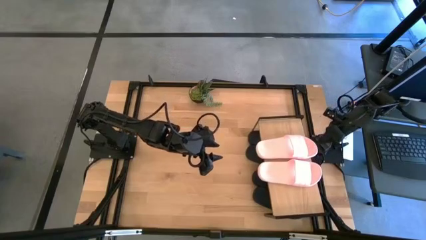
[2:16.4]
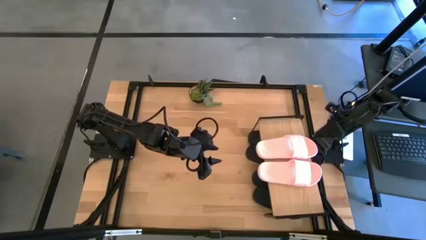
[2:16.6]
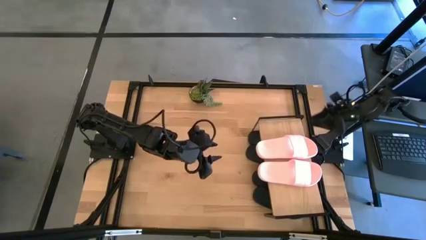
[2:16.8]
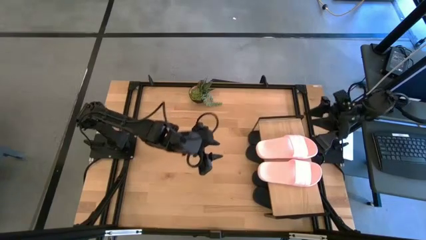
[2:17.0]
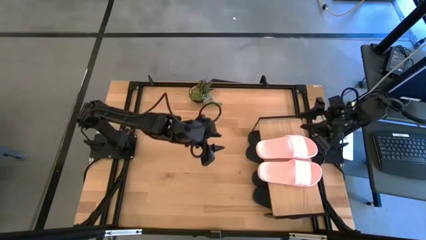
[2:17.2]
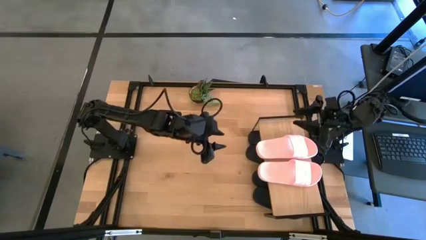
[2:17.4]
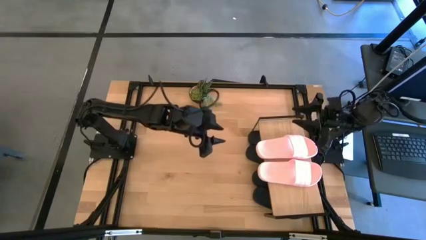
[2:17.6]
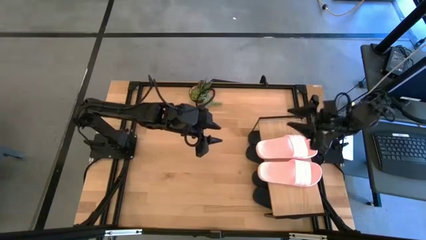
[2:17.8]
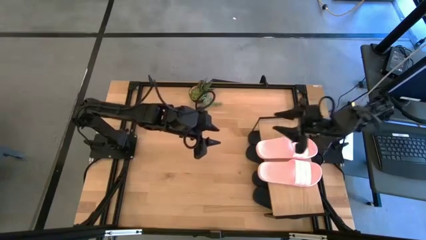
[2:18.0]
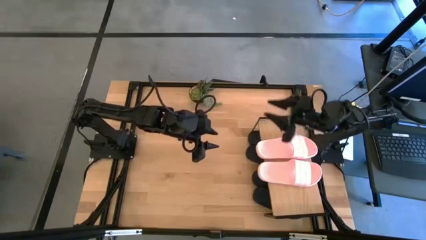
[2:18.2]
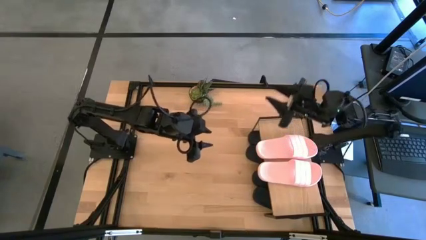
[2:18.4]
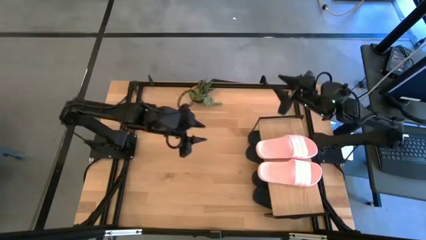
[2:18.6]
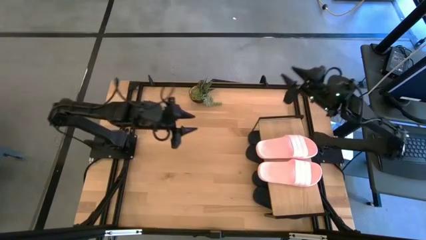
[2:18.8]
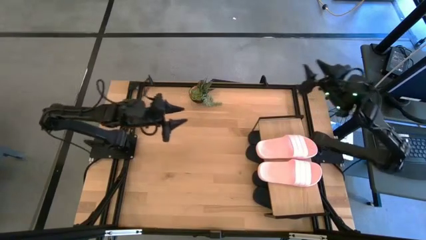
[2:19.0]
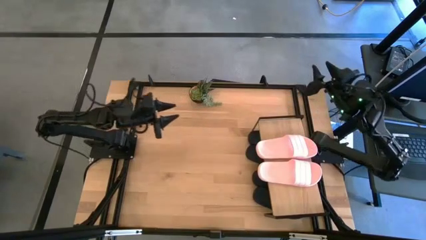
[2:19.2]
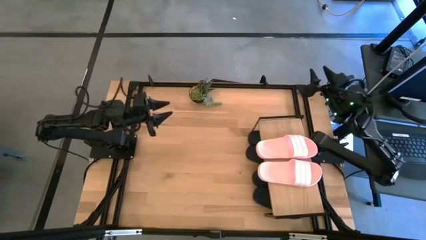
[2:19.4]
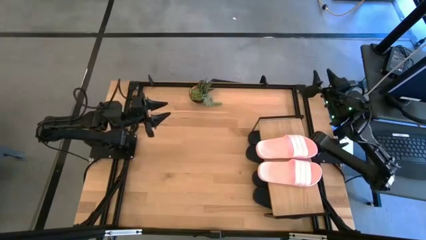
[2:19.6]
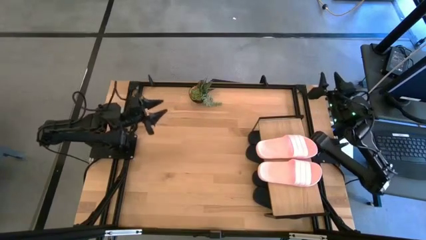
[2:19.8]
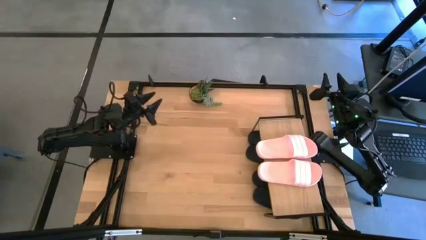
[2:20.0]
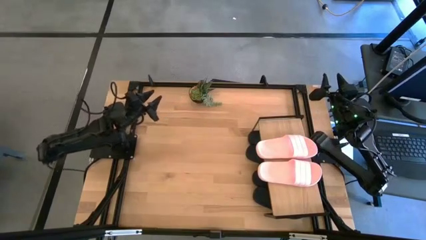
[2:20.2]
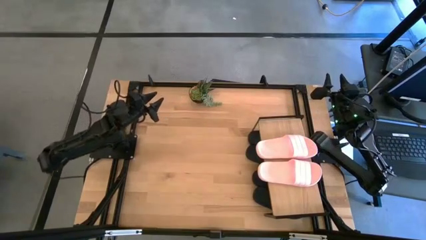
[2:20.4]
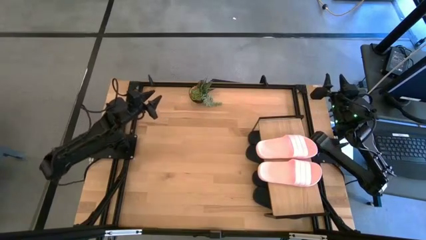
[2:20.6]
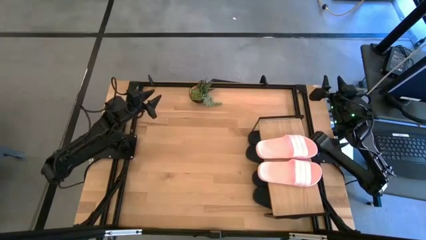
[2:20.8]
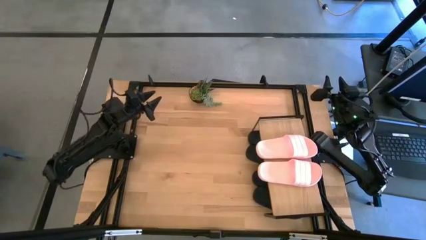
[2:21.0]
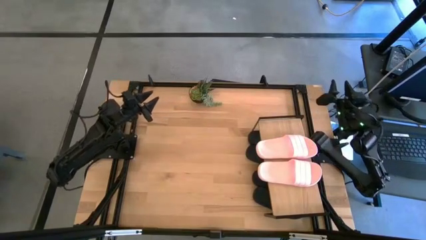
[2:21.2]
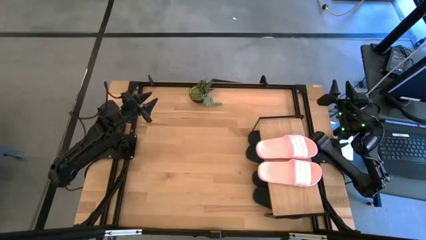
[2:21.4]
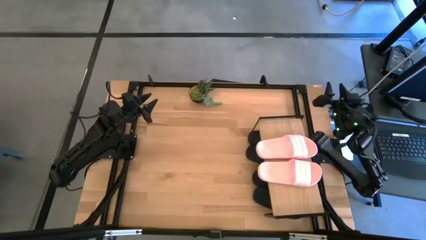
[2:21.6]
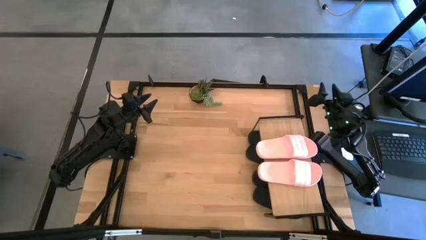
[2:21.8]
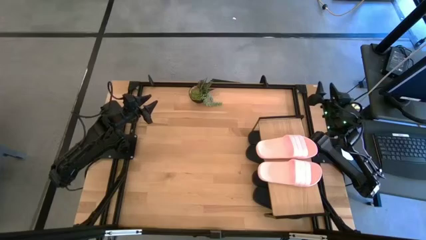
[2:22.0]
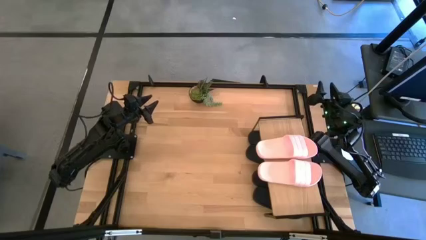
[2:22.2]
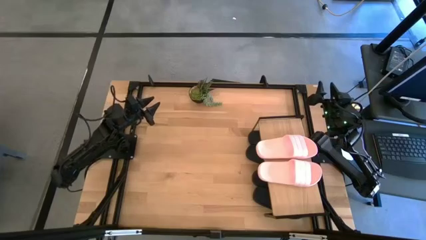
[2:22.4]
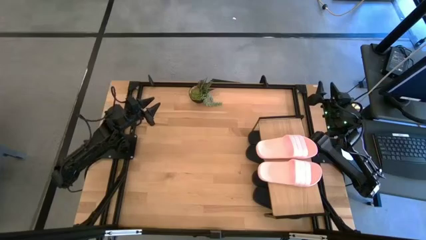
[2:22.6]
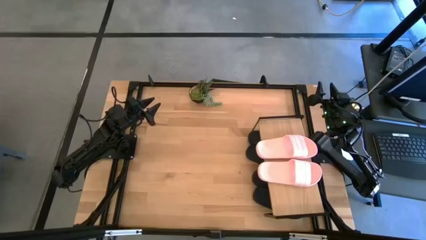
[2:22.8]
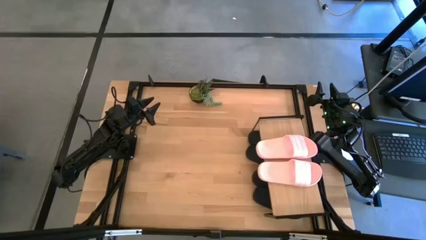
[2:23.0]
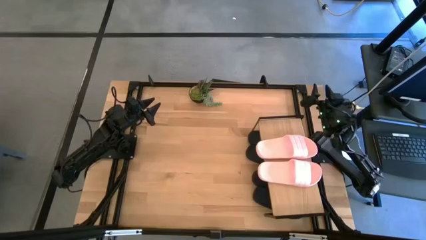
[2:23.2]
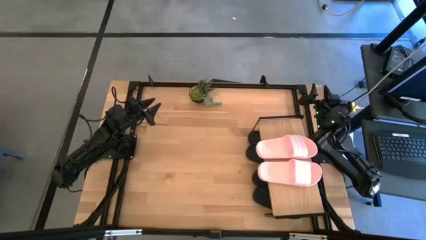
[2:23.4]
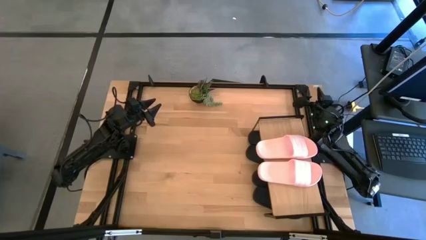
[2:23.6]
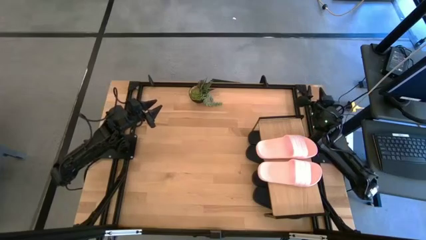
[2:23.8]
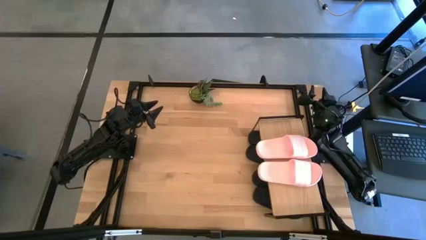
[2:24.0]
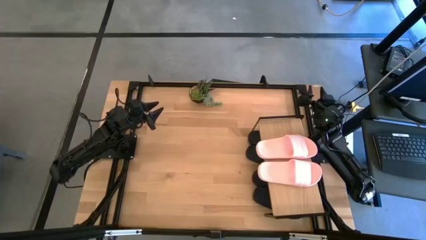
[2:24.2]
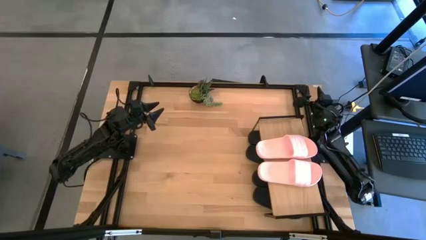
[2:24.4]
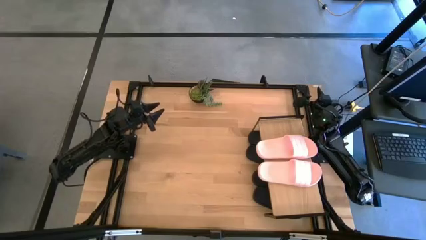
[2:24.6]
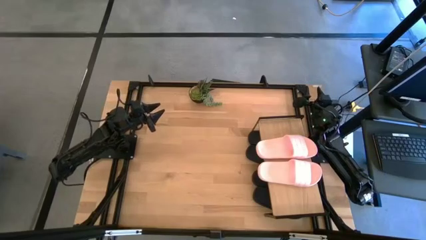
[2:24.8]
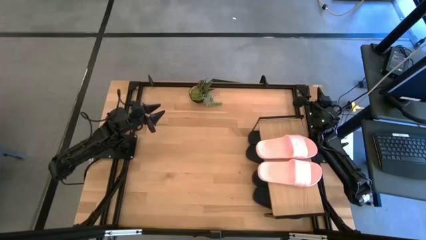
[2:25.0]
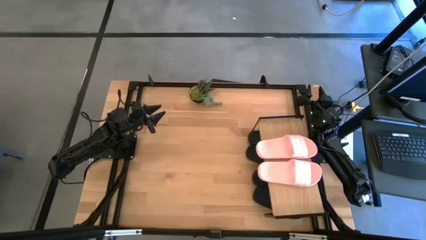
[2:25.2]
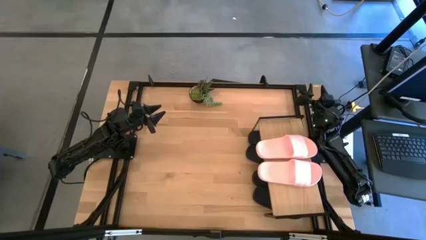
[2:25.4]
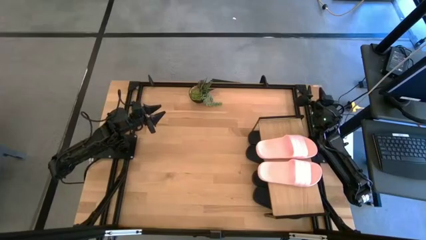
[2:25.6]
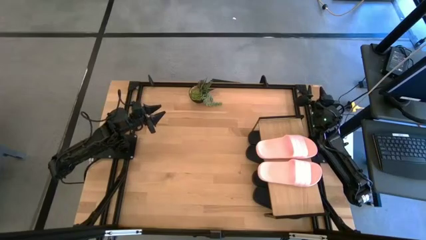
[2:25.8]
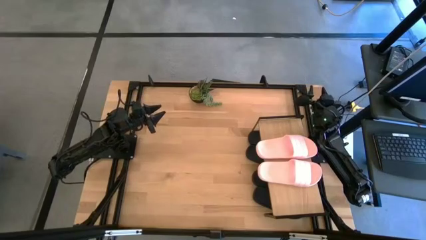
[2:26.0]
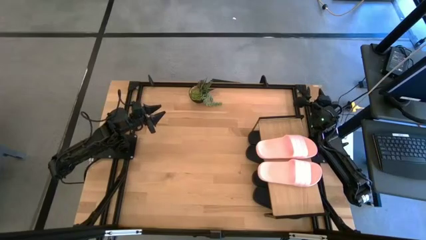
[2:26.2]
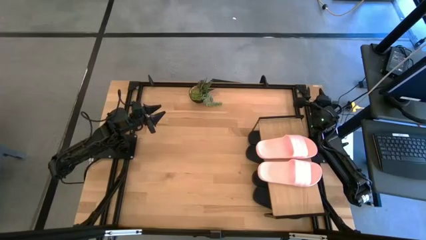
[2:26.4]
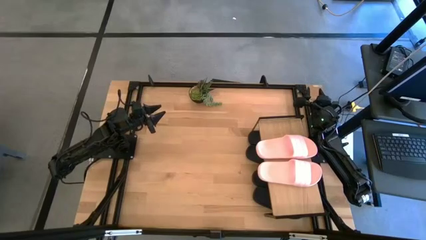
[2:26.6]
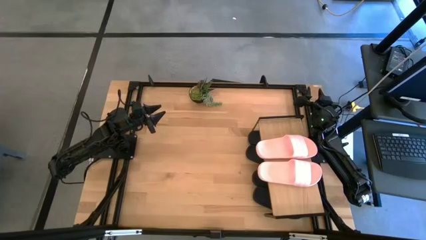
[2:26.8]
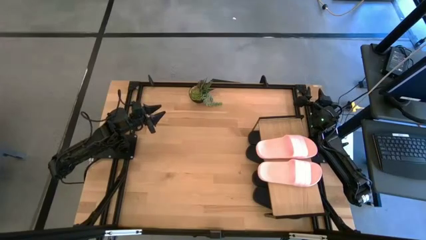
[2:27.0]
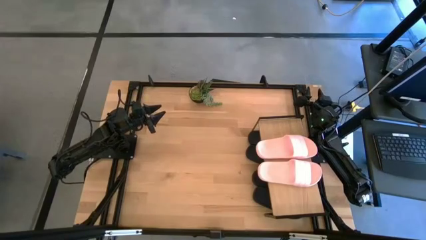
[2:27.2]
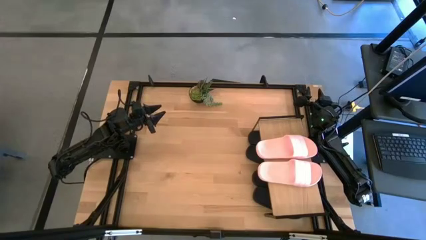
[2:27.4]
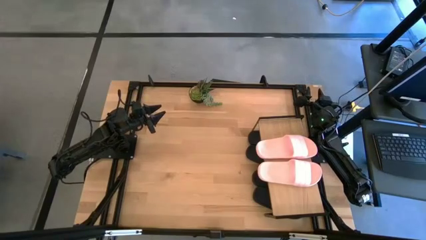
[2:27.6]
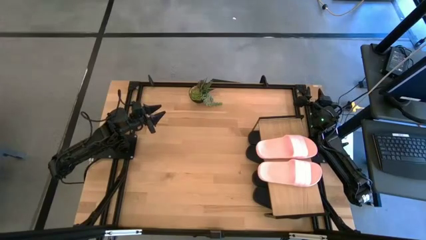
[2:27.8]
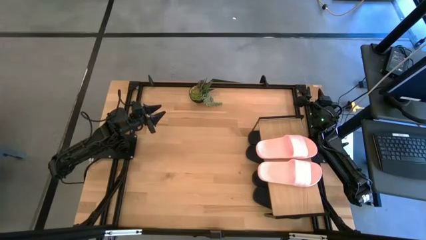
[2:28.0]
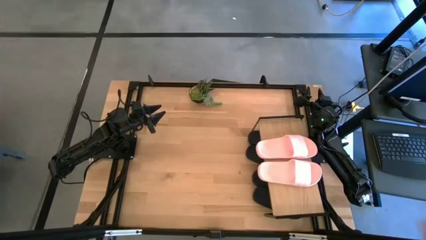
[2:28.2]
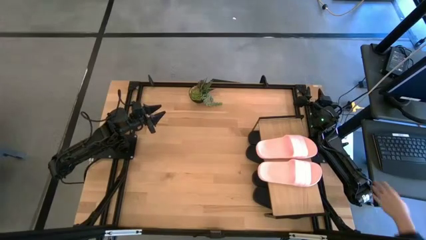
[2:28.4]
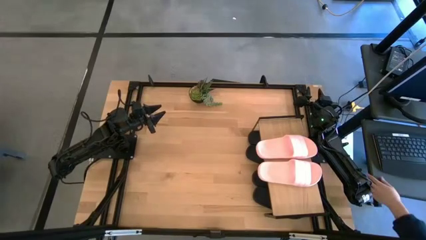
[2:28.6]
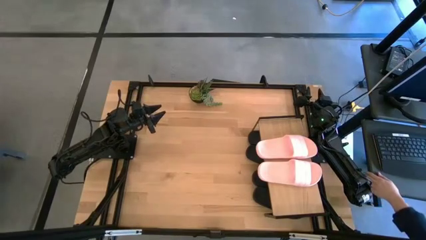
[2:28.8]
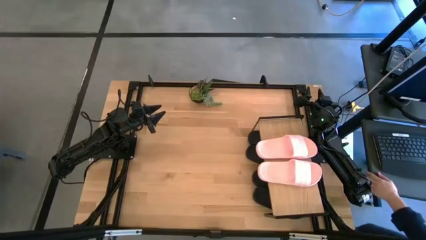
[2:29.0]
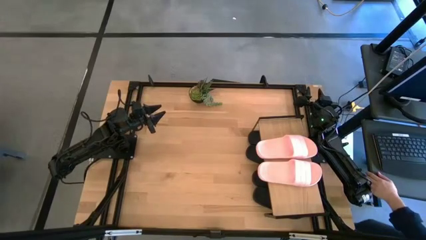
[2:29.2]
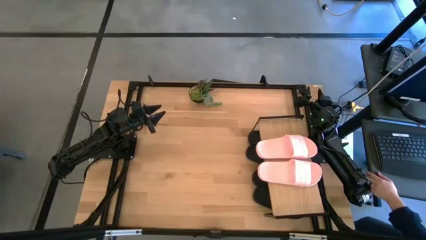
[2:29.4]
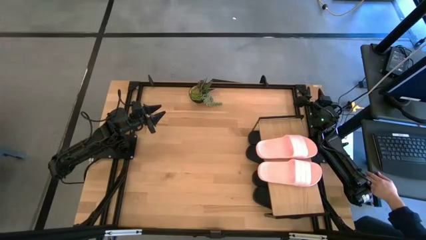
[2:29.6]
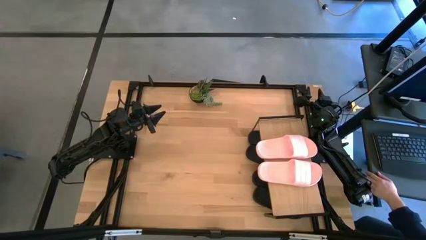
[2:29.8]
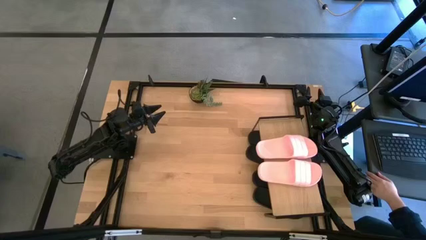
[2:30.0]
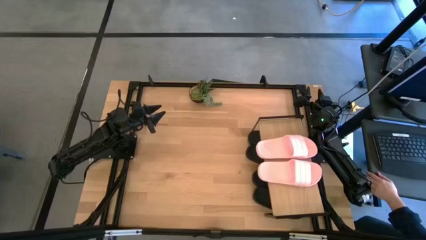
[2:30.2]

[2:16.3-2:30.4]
Task: Pick and place slides into the shelf
Return to Home Position
